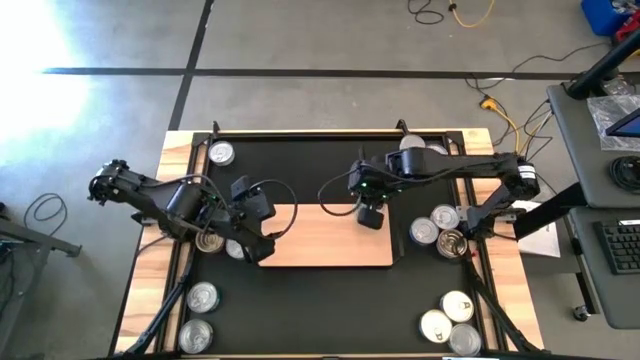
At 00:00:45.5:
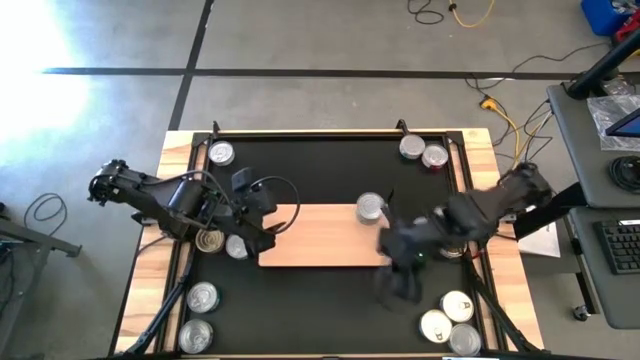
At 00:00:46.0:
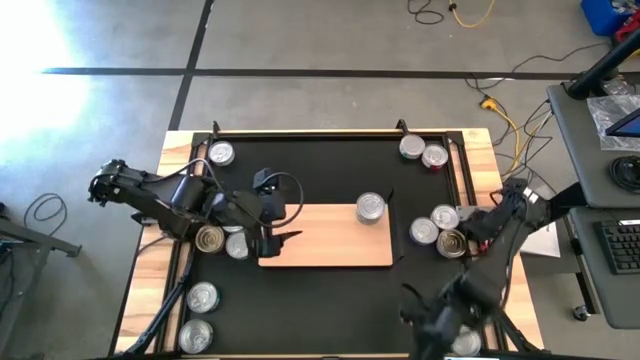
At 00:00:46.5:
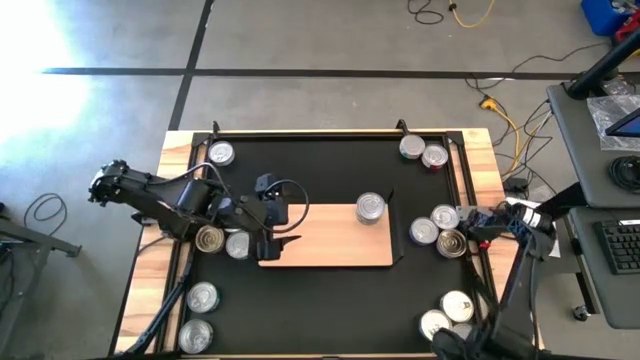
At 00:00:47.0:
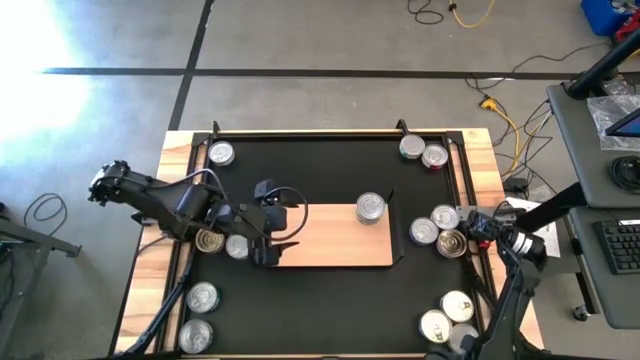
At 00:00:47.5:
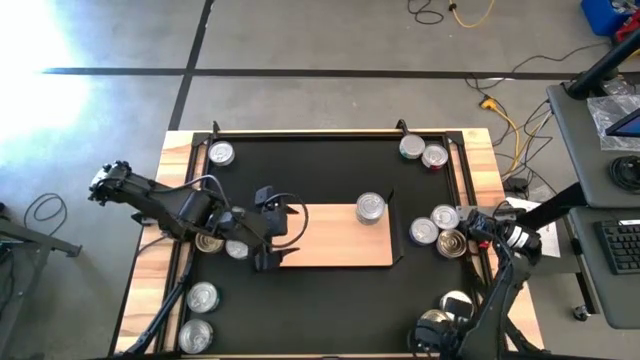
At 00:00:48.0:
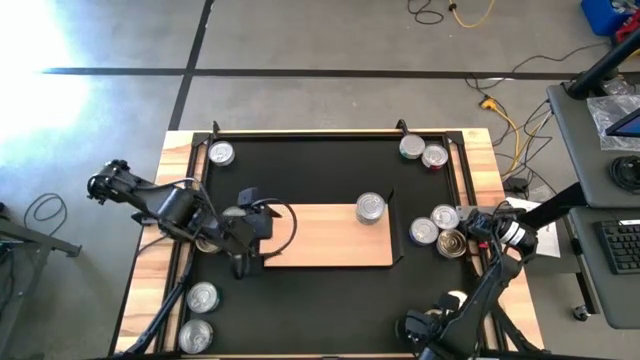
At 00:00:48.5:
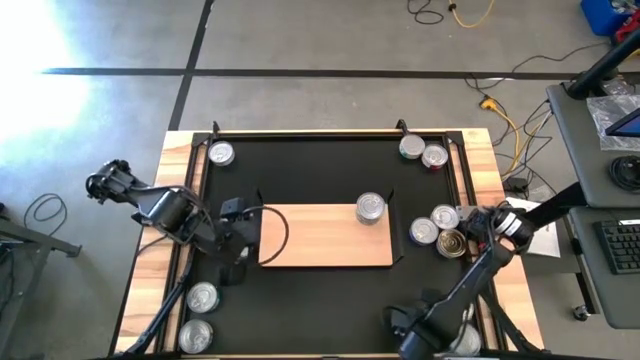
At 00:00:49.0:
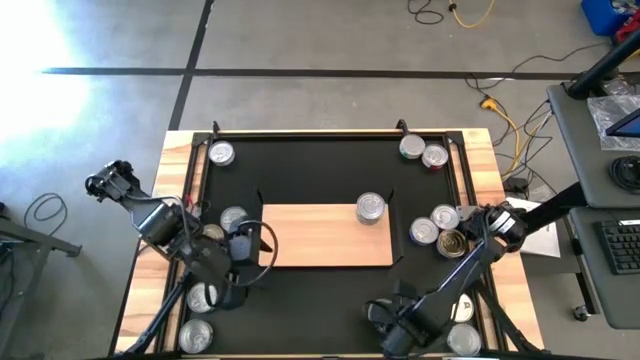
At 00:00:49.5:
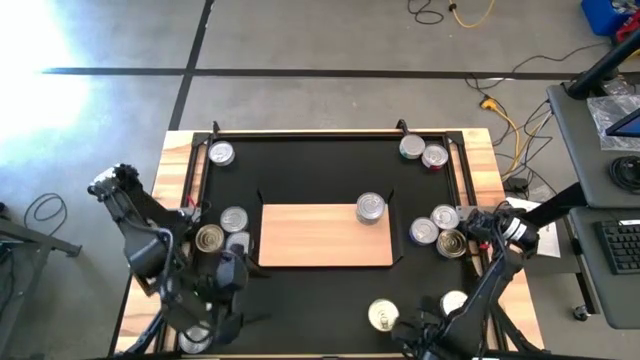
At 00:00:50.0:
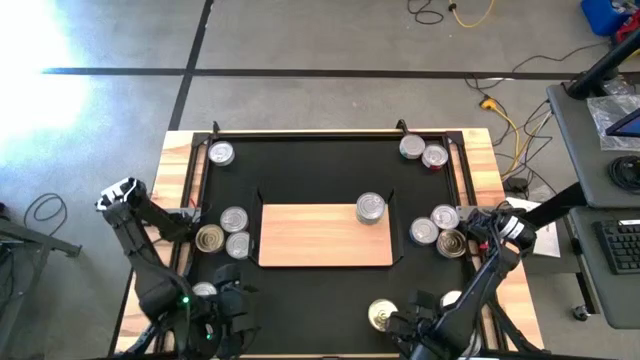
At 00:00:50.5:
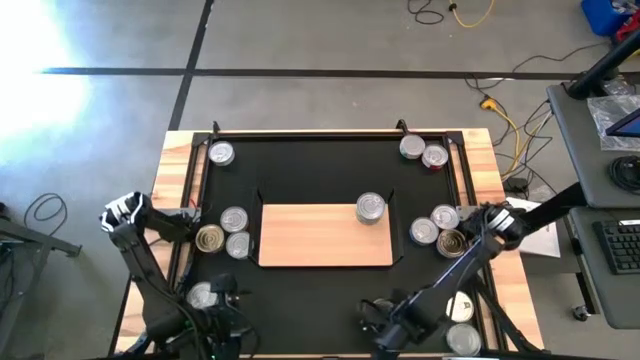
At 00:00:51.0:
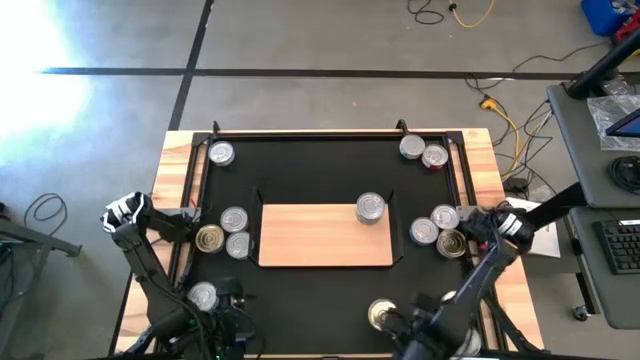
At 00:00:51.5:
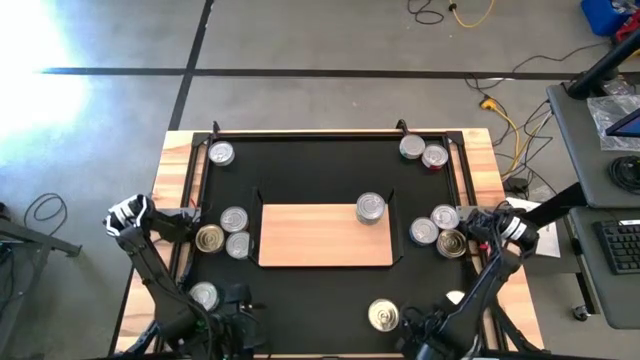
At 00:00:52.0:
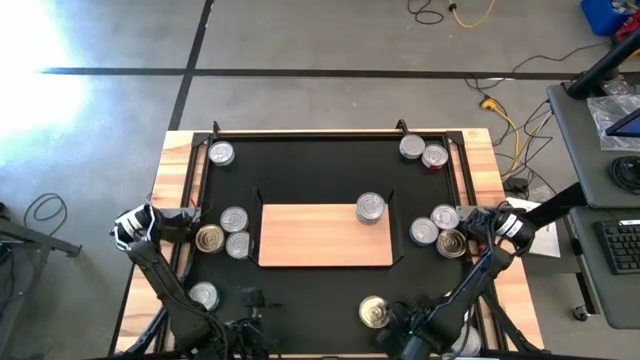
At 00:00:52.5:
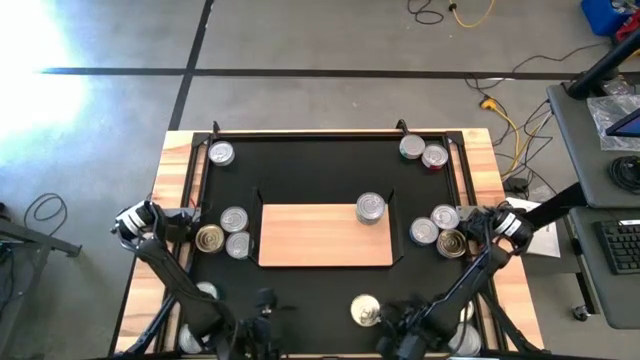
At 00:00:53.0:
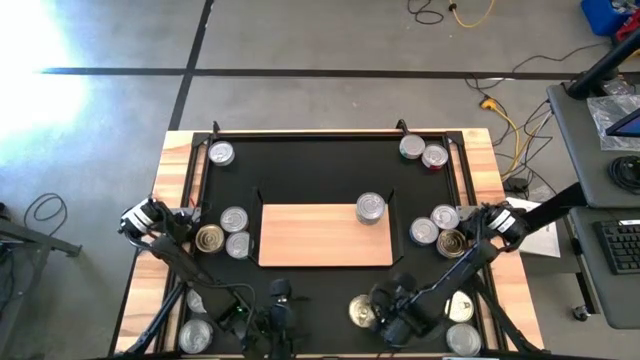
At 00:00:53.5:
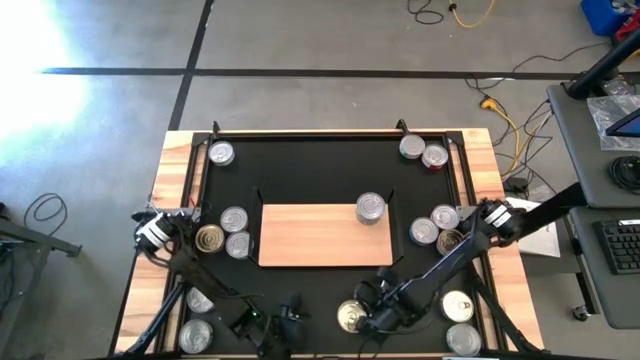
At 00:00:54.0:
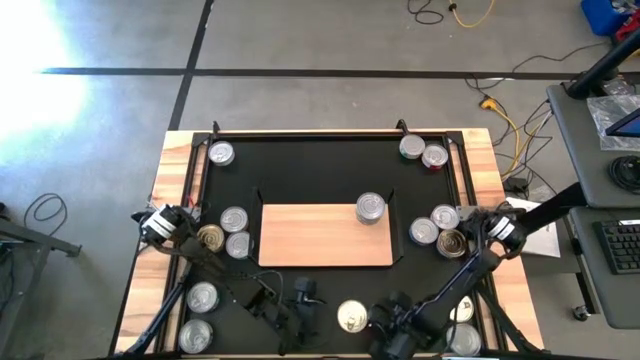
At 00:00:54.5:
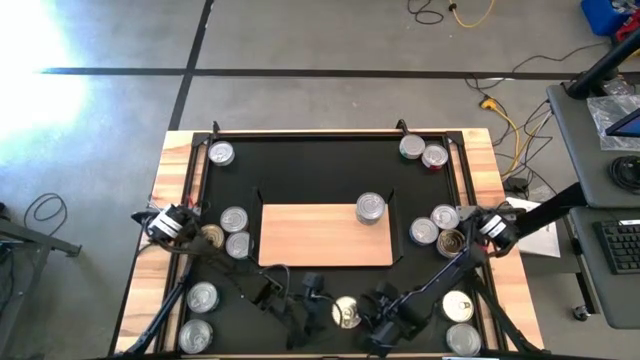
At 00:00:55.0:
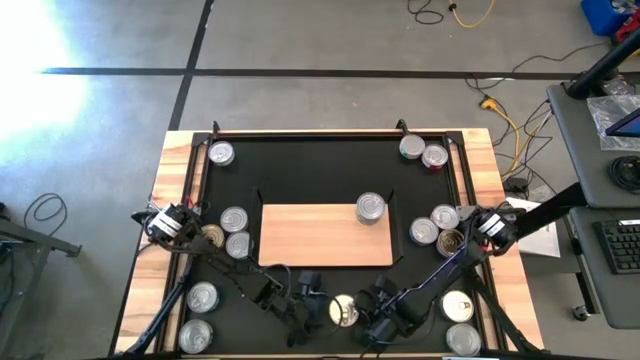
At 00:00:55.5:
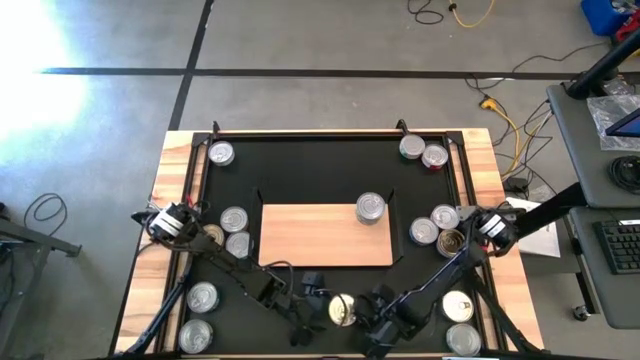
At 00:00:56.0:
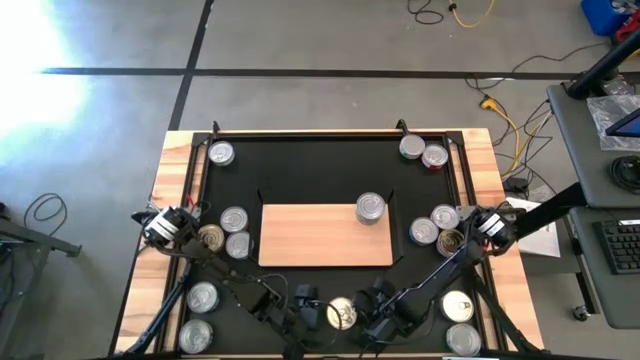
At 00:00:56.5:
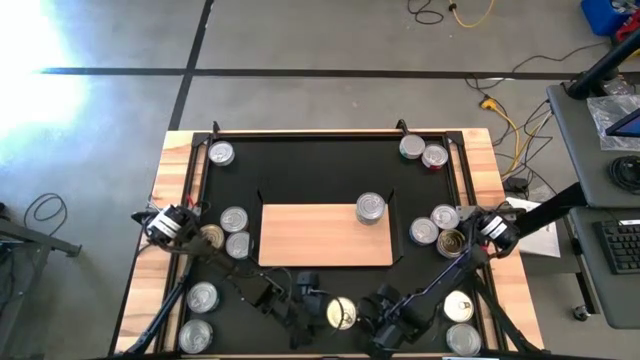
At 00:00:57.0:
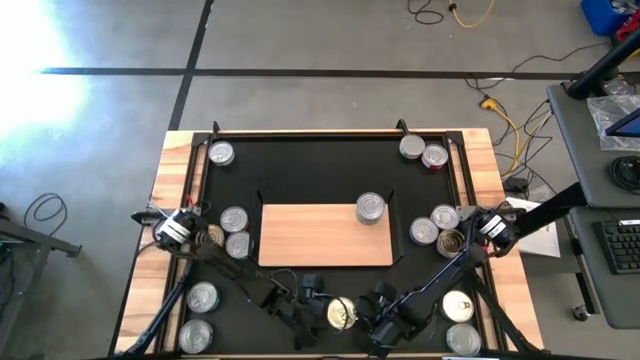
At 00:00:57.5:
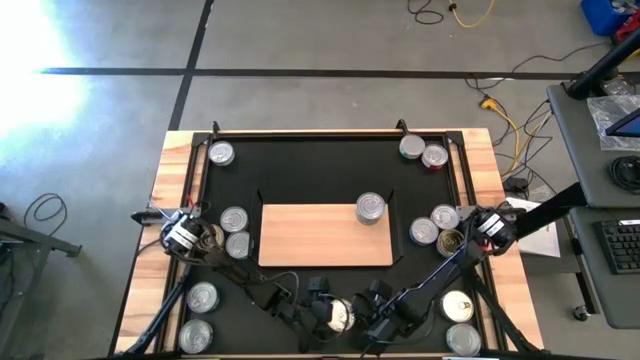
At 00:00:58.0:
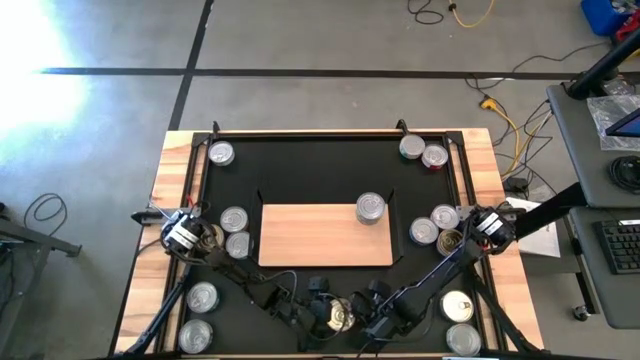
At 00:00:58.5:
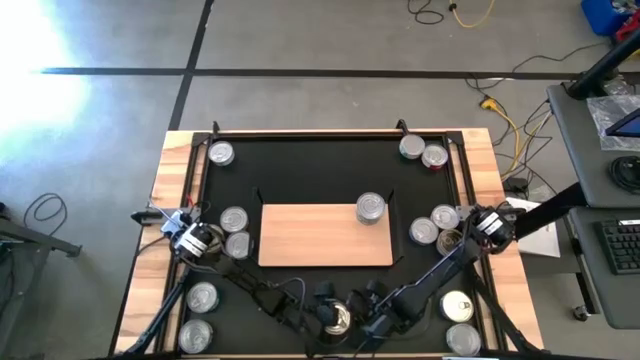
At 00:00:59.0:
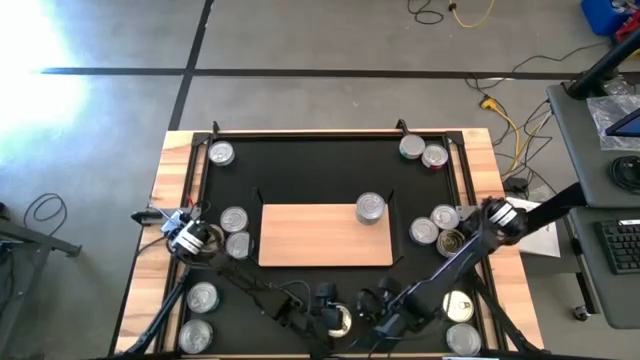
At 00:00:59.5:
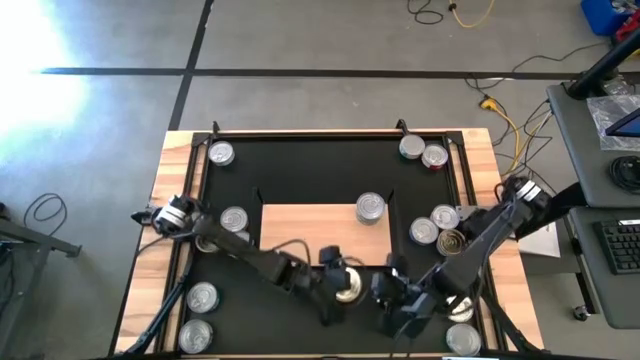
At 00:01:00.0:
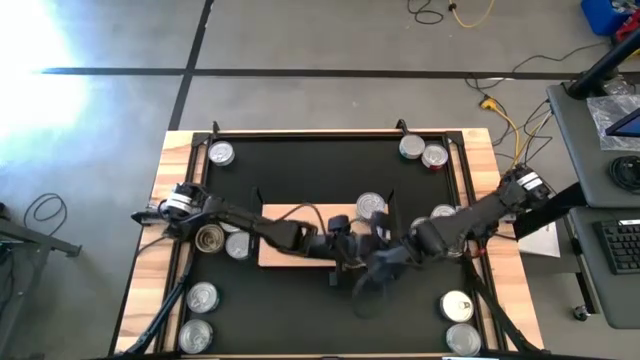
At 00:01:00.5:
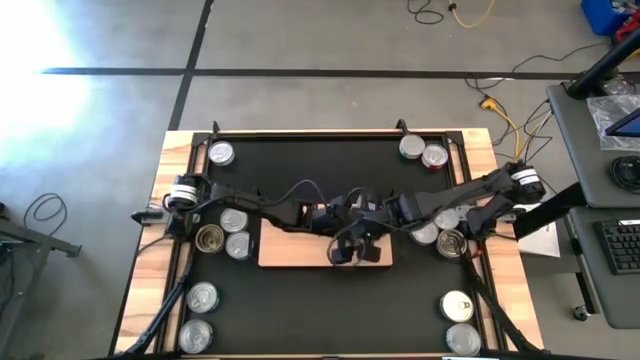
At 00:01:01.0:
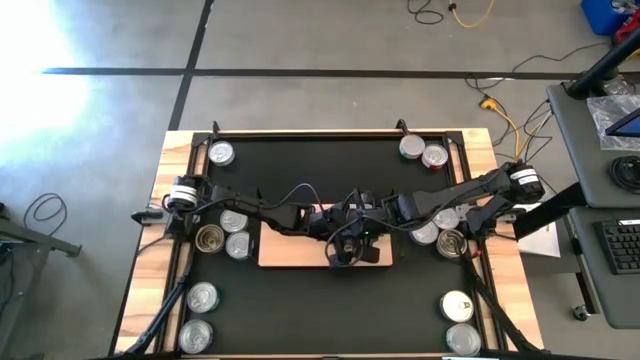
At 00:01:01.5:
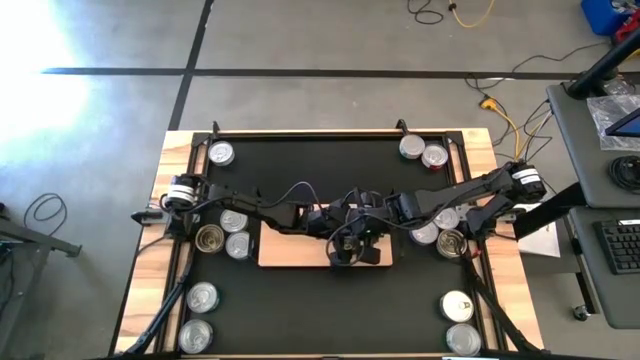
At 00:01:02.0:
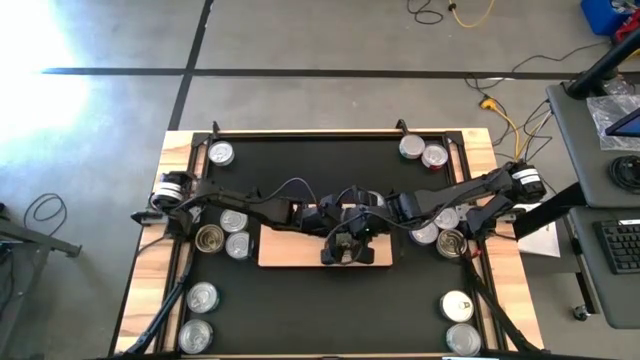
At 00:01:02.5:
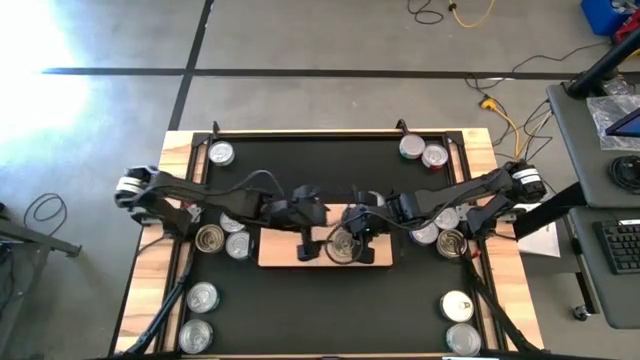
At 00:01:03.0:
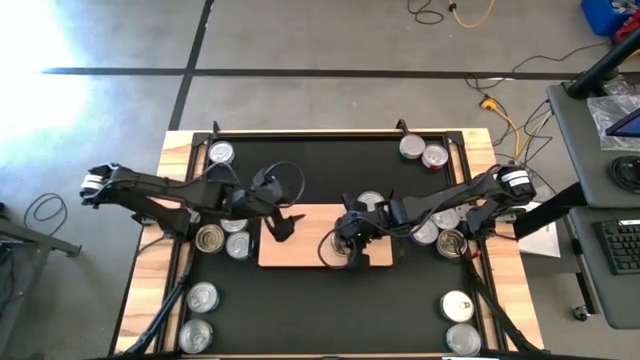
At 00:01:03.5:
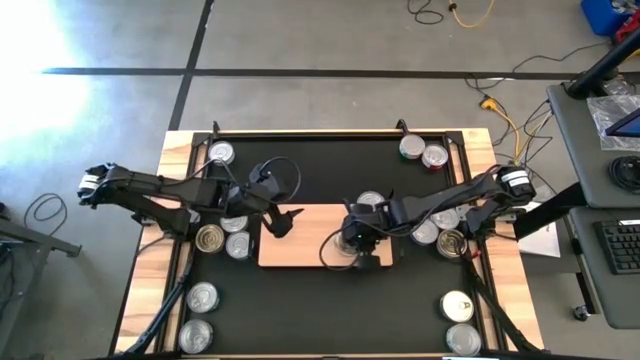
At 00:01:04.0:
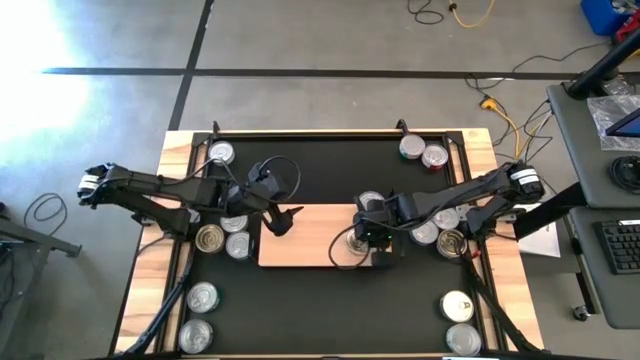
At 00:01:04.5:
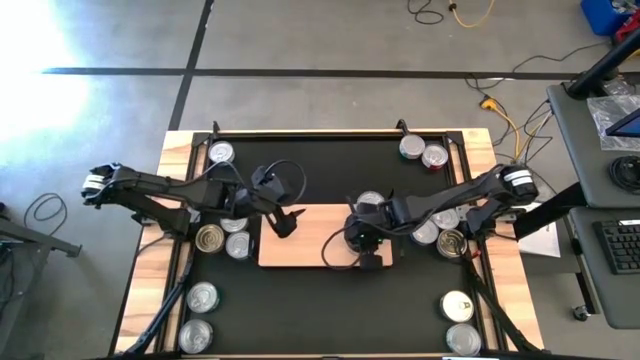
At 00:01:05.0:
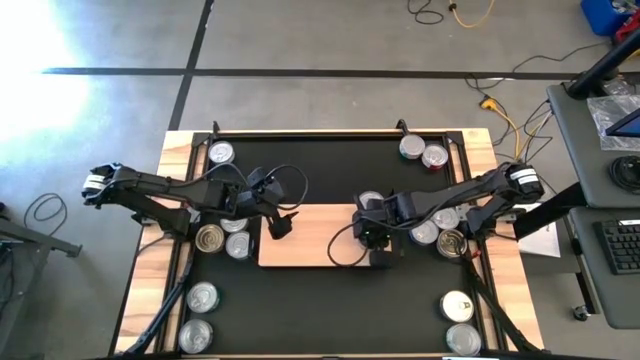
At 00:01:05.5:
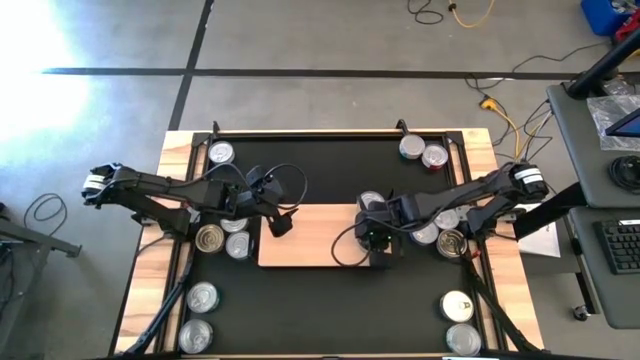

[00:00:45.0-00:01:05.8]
Task: Stack canned seafood by type on shelf
Put the bottom right blue and orange tuna can on the shelf

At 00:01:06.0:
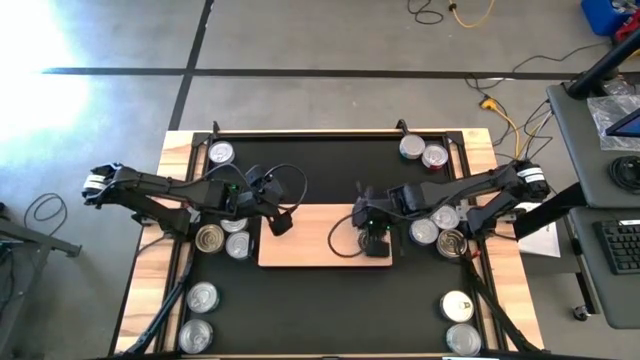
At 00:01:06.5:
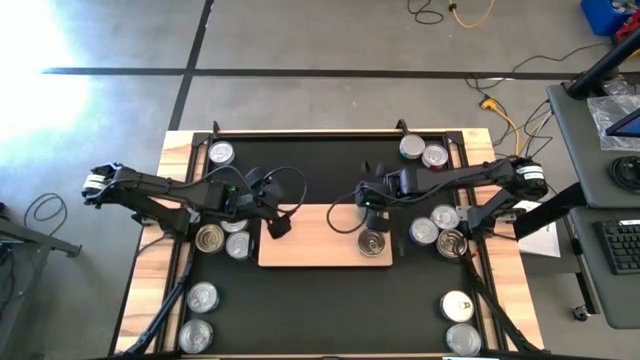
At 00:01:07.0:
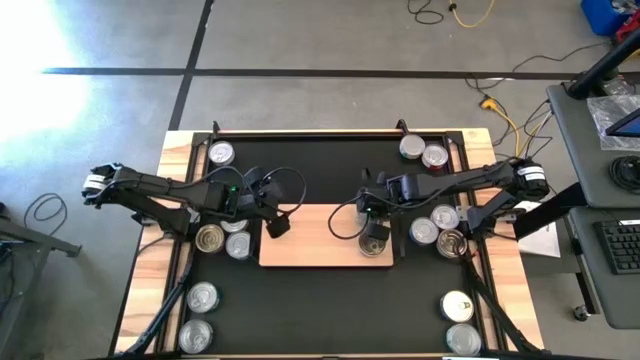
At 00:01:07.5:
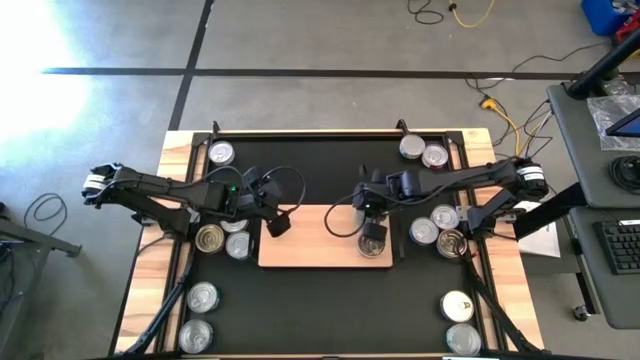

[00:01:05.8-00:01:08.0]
Adjust the stack of green tuna cans
